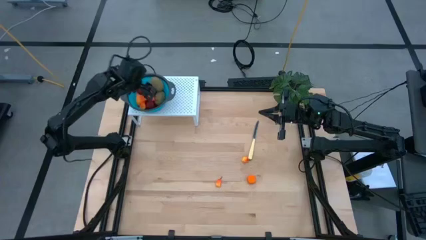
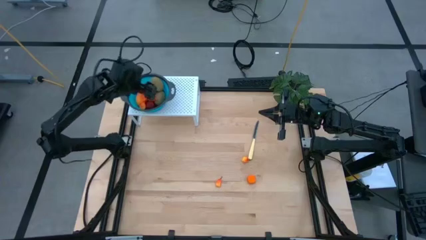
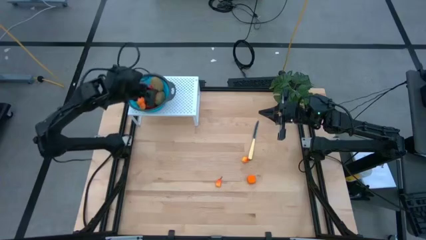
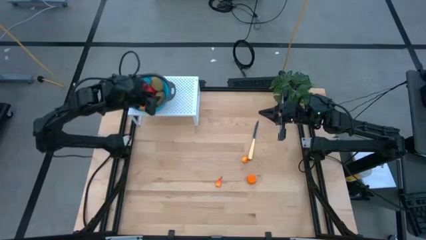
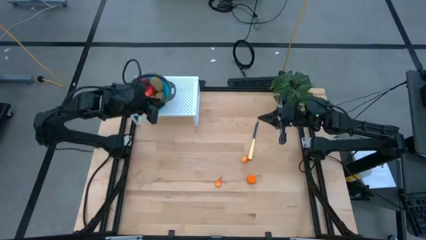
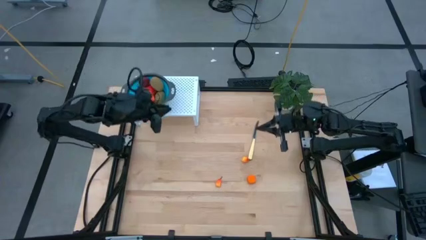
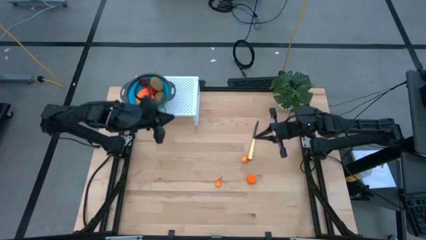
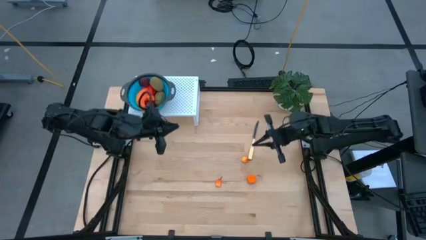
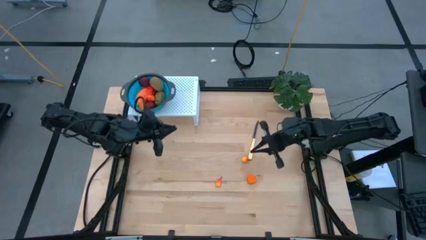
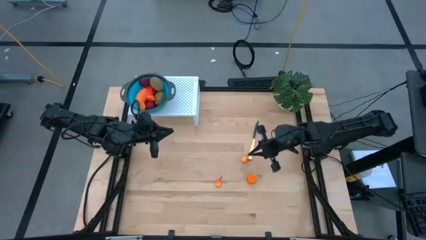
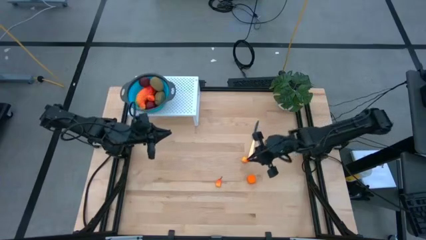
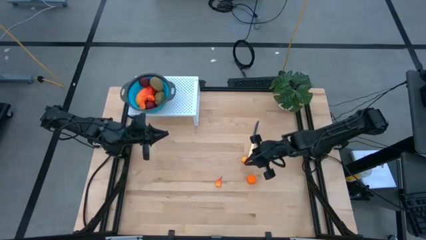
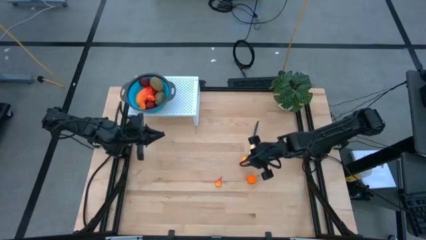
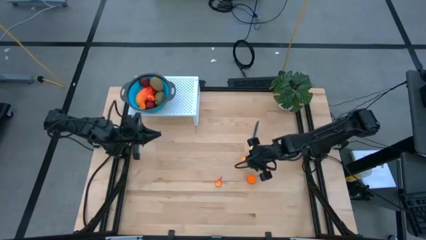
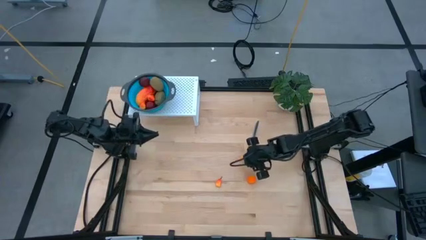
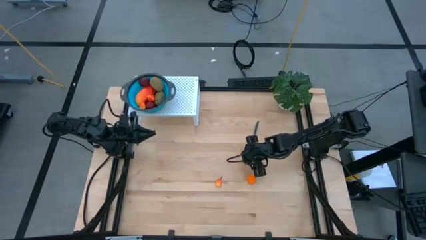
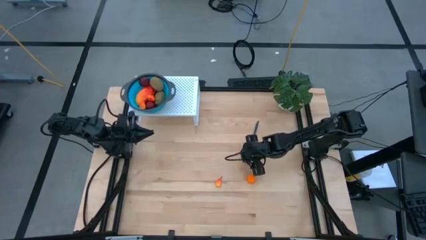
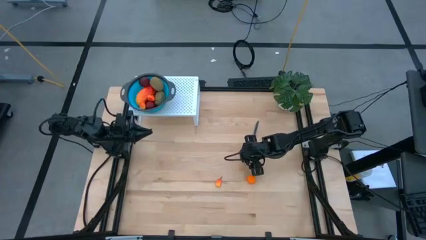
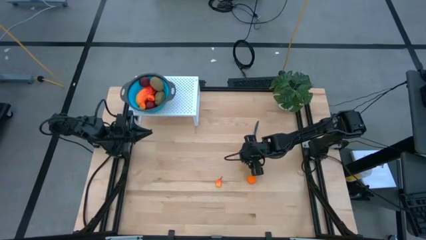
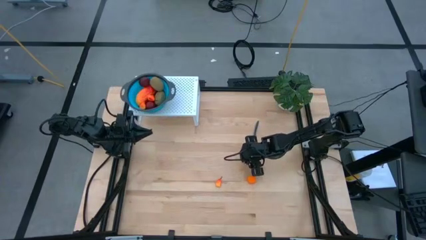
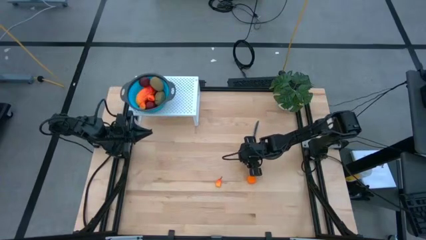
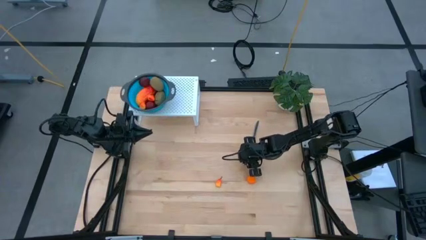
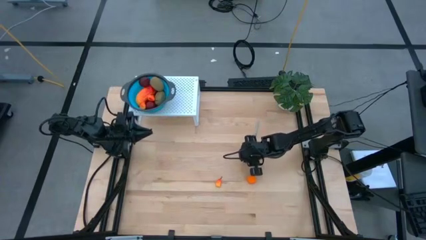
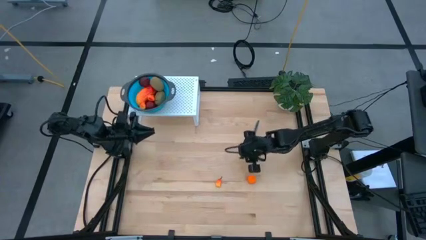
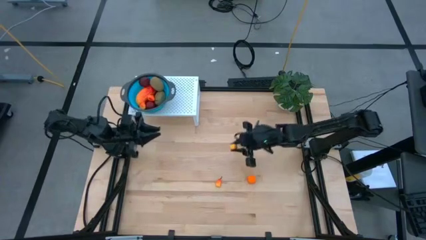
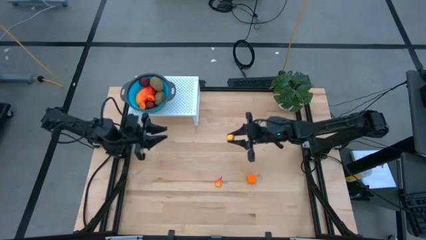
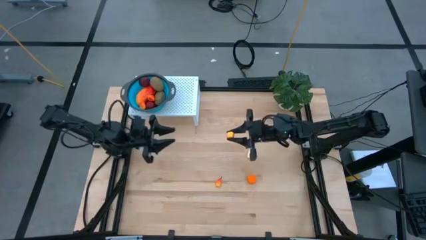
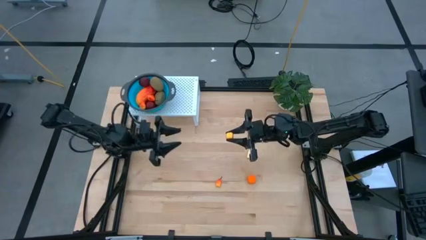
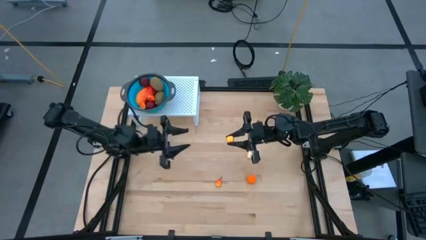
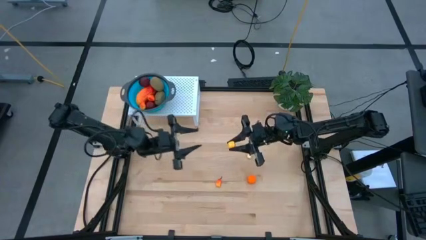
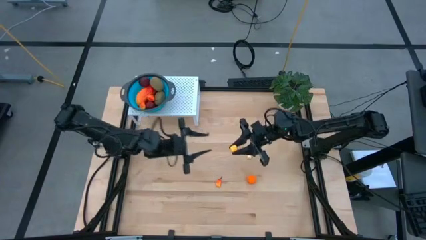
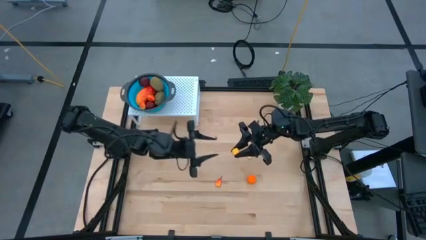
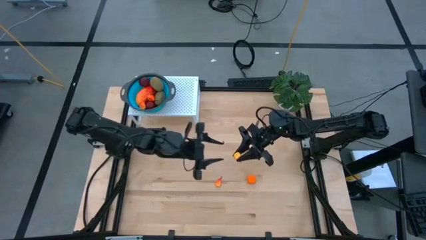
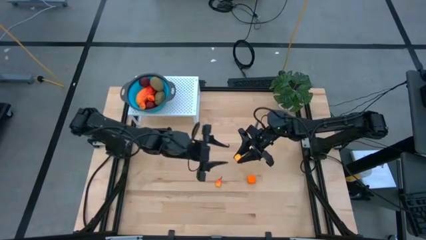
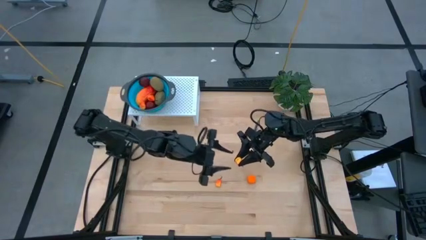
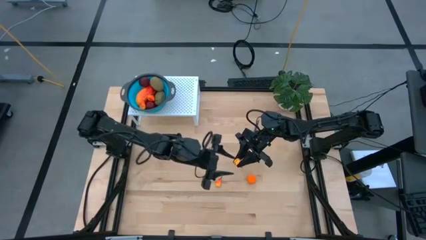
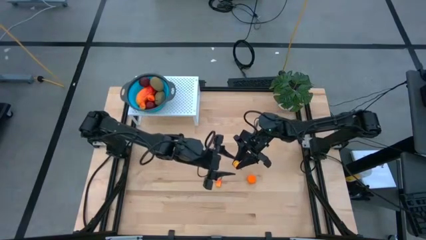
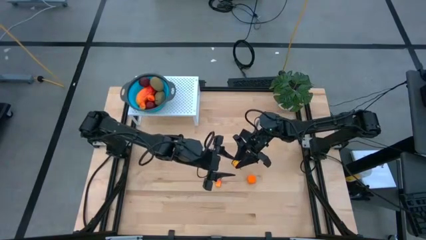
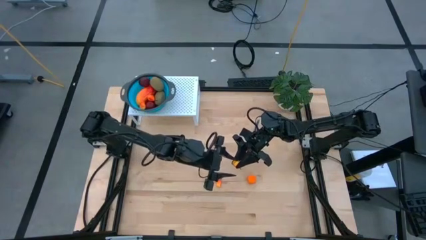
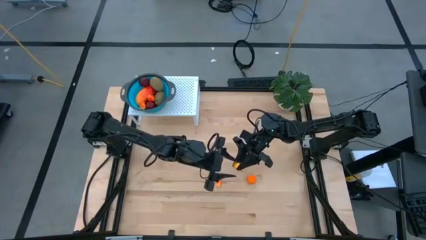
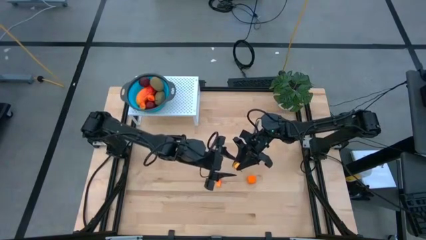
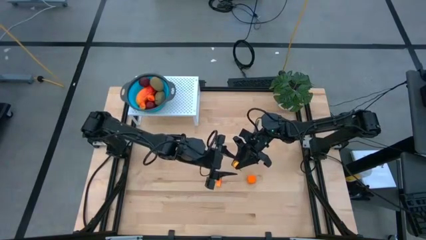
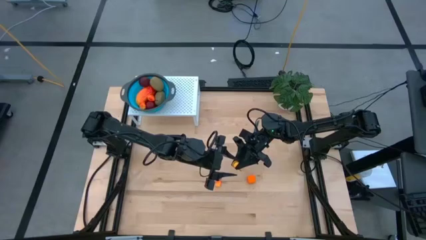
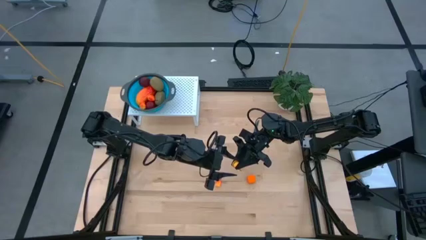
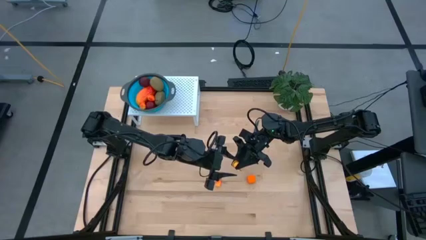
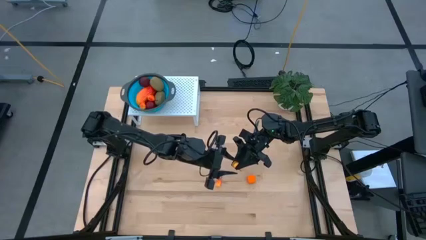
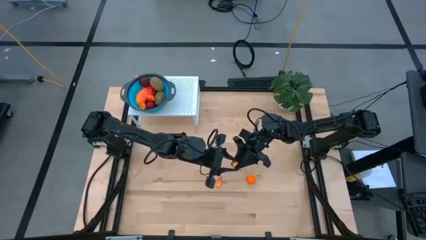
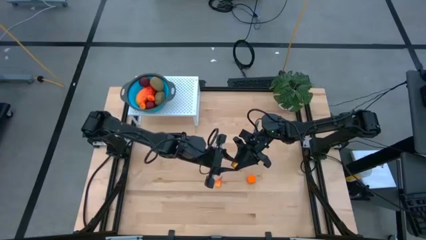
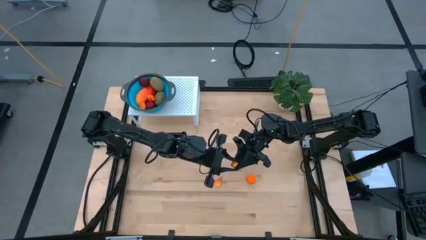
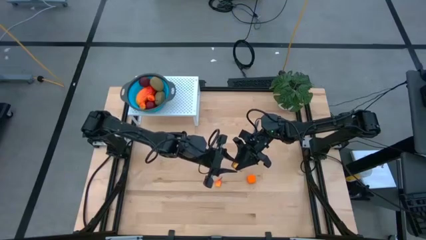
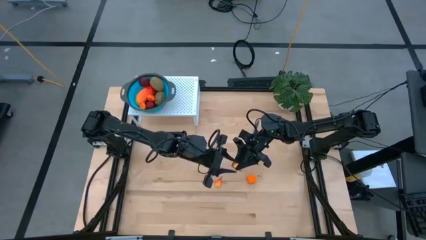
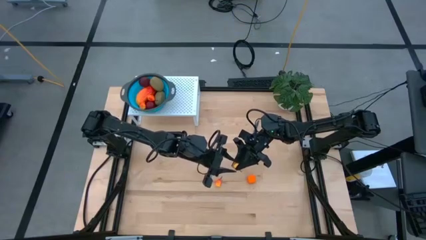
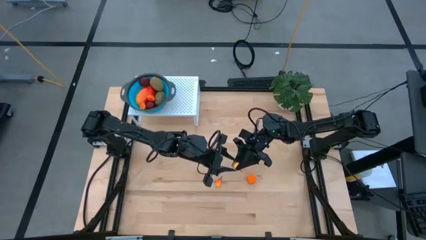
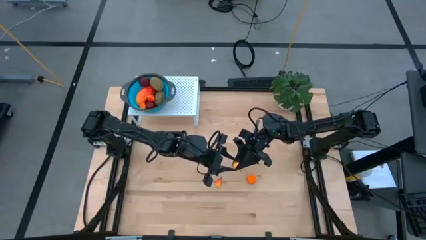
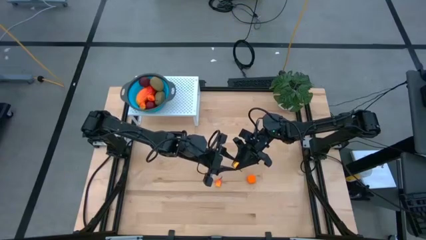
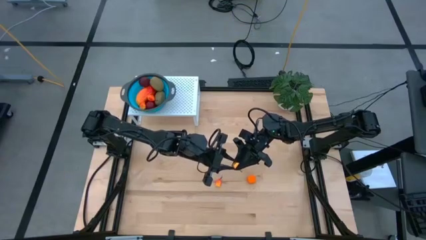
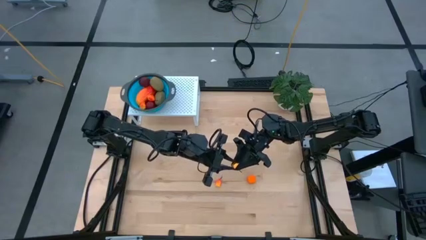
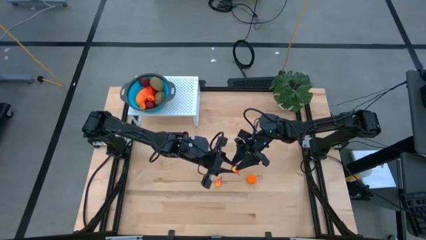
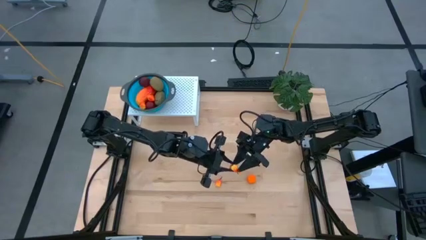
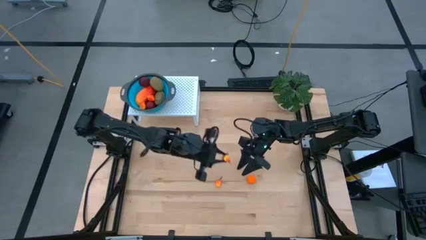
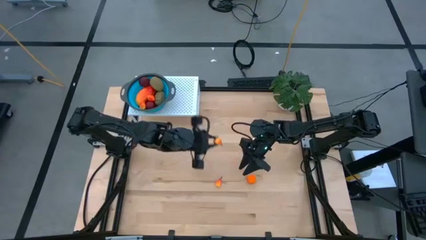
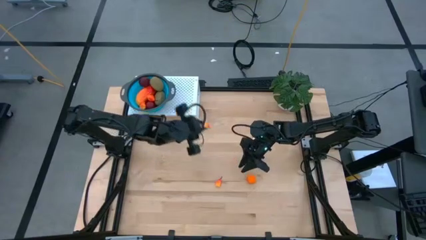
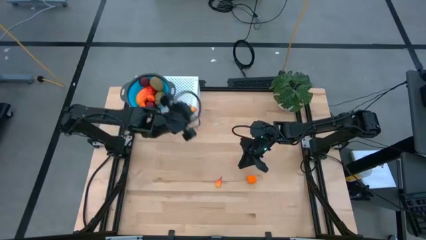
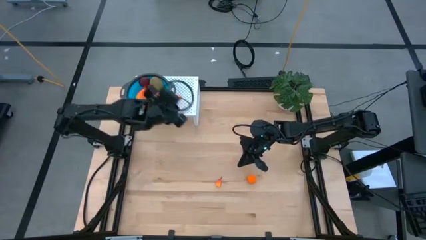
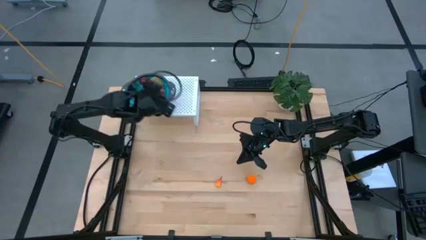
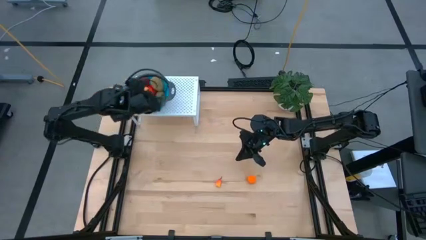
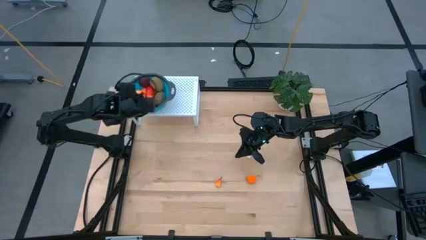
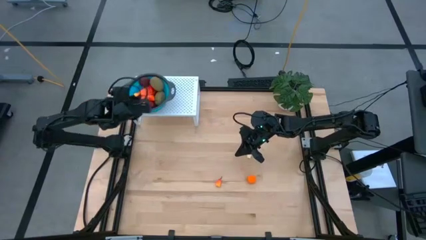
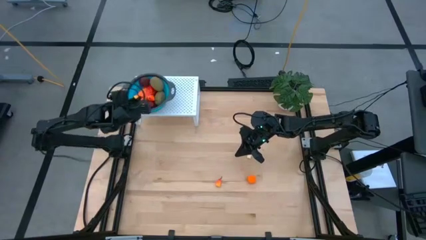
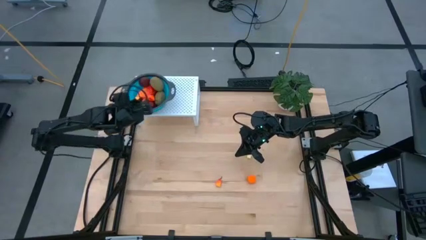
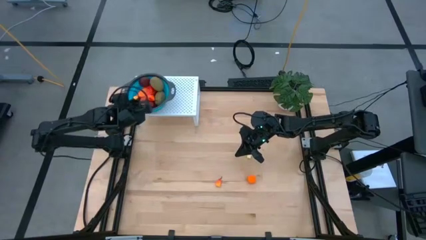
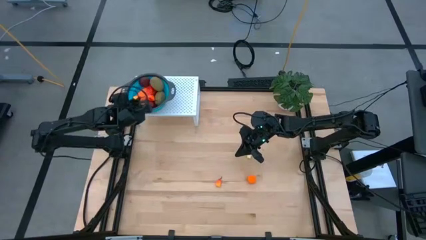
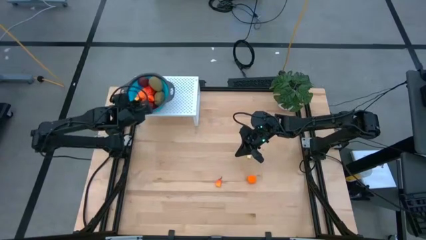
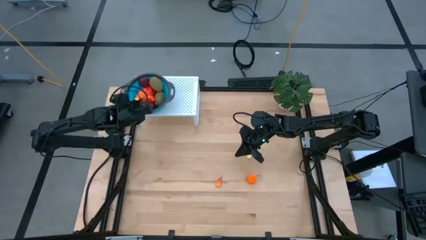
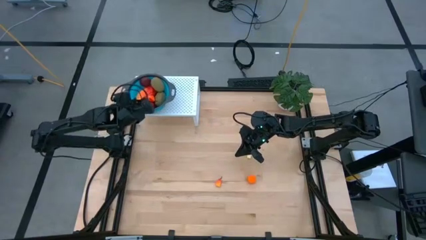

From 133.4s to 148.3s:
Task: Pick & Place Fruit
Put the orange peach into the blue strainer bowl on the shelf
